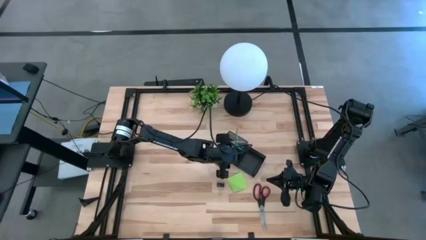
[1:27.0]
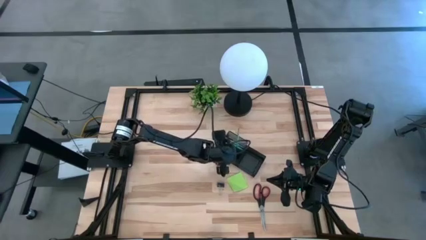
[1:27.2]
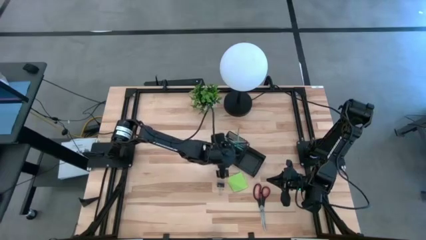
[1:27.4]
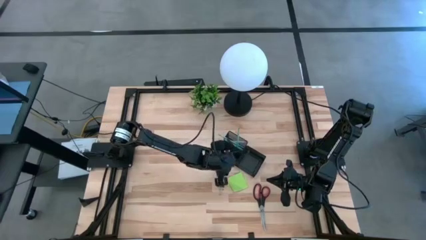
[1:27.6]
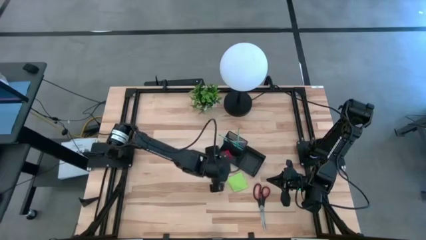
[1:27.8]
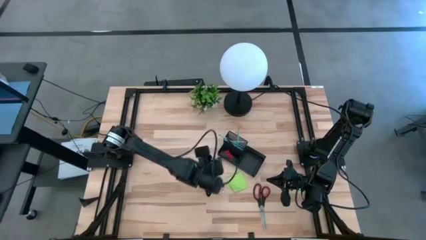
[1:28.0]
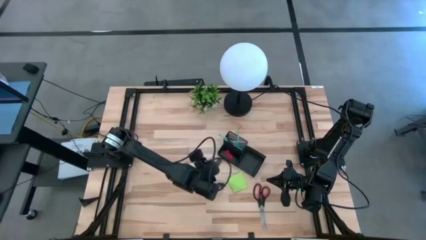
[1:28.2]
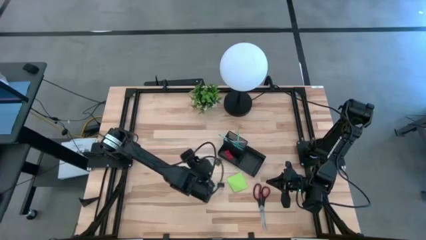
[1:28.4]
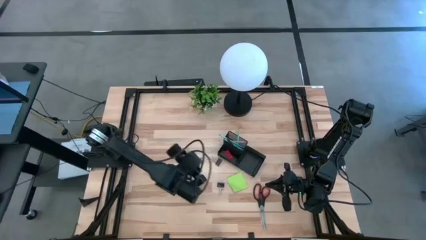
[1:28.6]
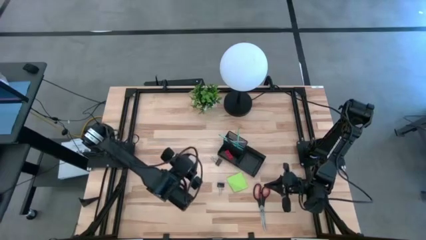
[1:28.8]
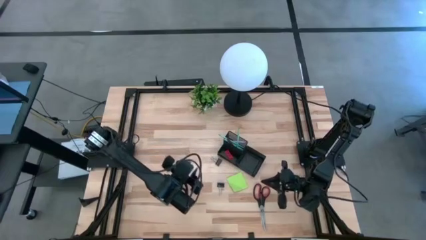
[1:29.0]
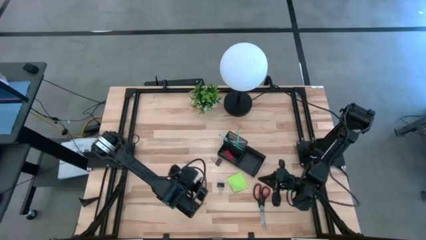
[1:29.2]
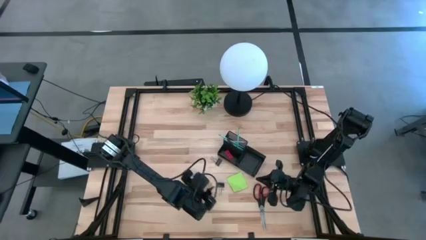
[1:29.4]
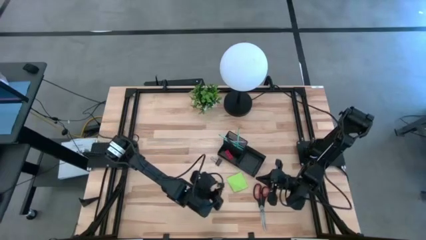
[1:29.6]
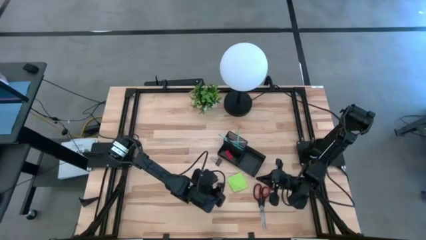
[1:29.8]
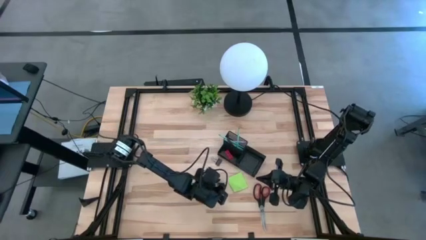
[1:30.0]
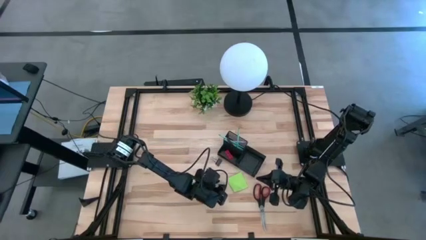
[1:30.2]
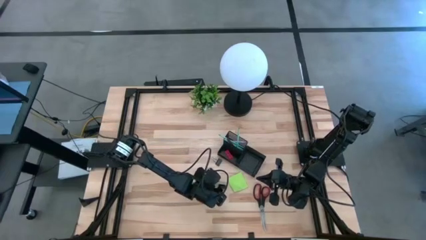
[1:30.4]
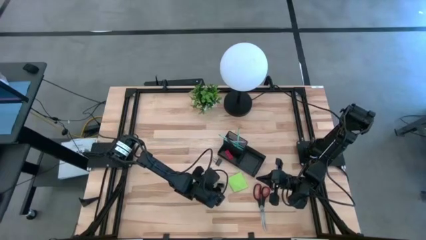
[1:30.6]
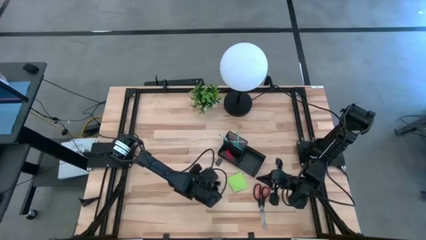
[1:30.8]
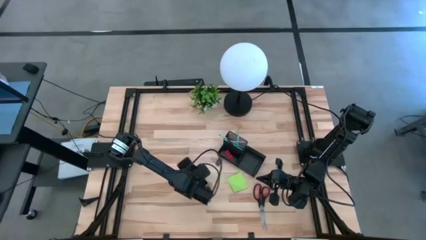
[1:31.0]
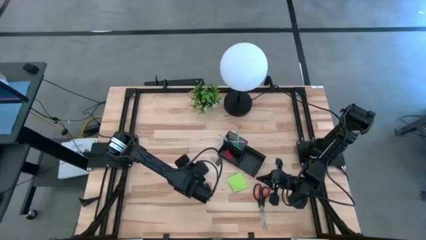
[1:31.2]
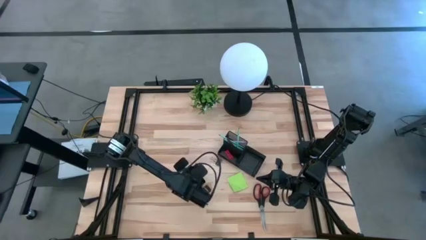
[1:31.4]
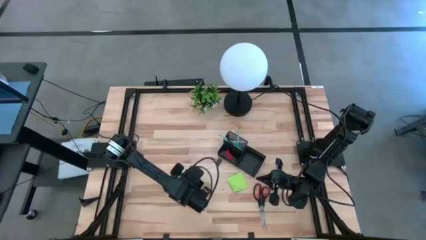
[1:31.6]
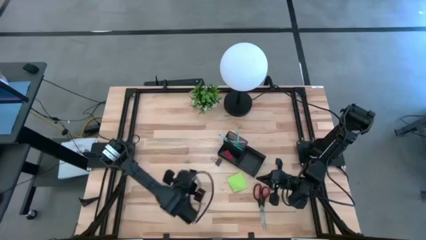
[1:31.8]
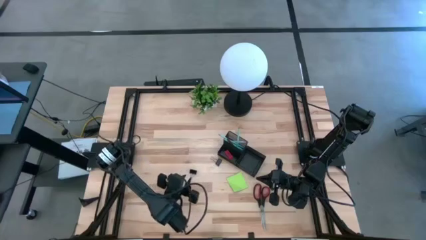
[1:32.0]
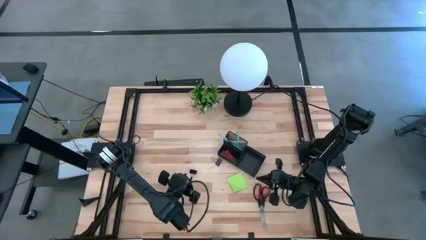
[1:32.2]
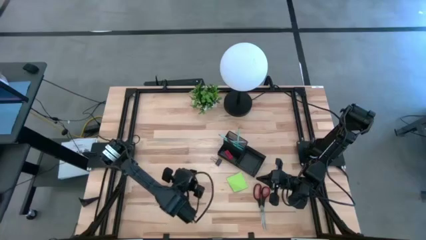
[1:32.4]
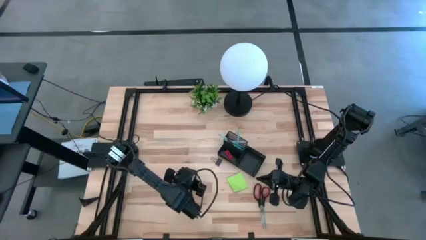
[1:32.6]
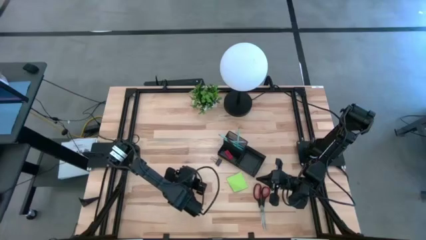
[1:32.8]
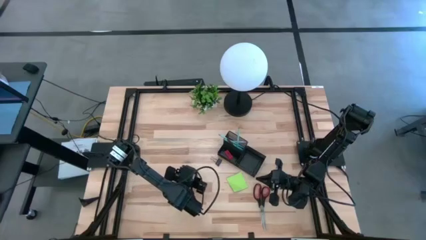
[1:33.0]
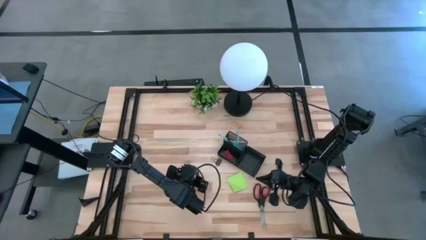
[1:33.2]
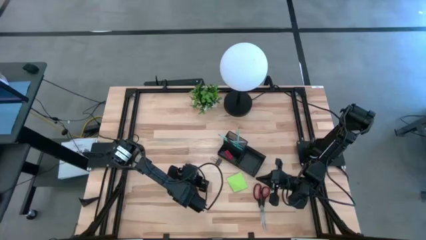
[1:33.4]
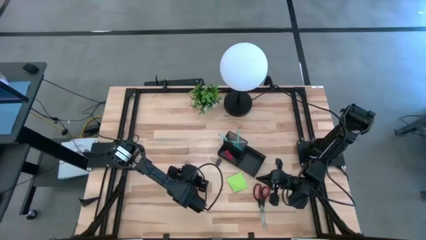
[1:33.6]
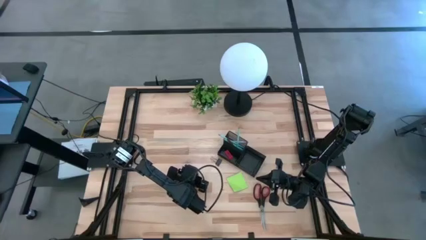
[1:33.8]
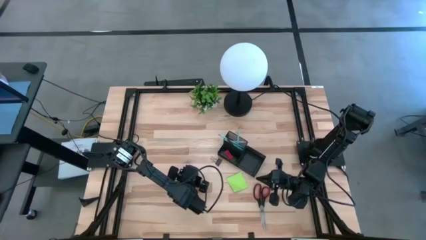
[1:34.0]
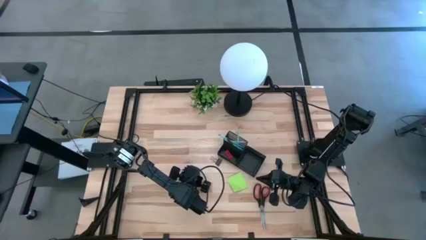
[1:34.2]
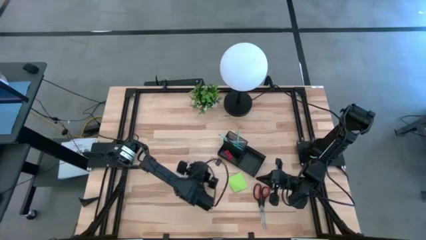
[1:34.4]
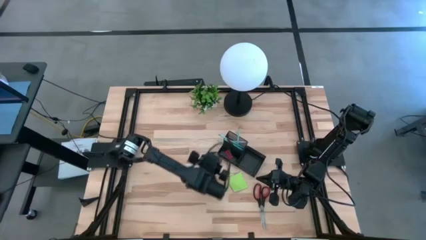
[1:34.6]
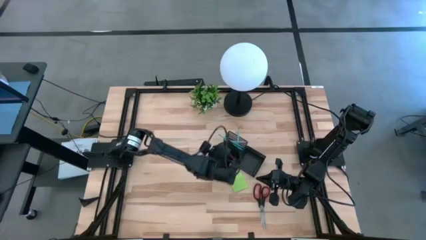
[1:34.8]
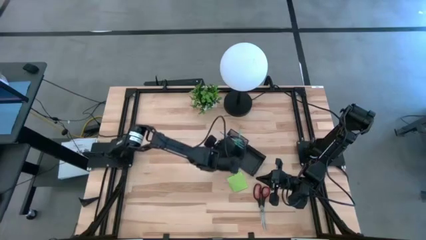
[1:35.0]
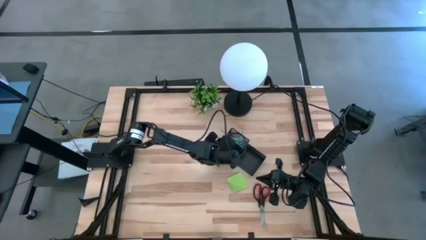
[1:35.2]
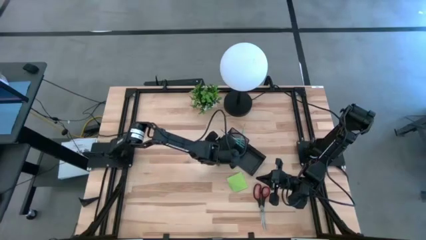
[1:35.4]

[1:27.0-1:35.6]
Task: Pick and place office supplies into organizer
Put the black binder clip into the desk organizer

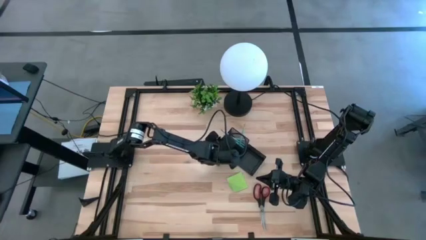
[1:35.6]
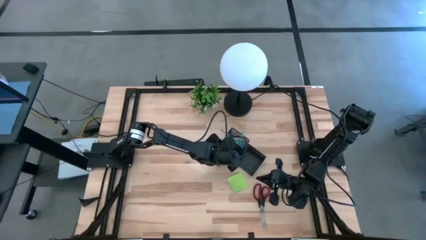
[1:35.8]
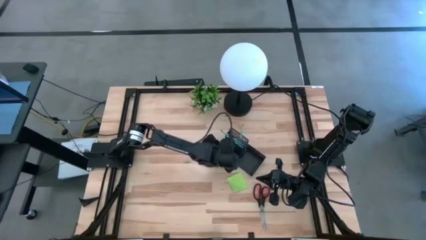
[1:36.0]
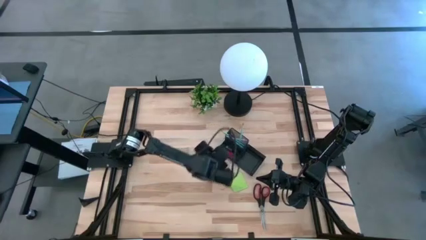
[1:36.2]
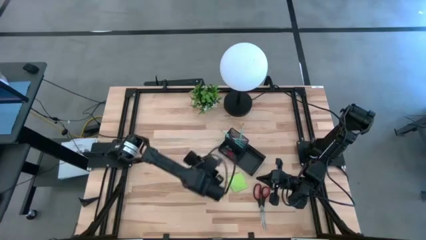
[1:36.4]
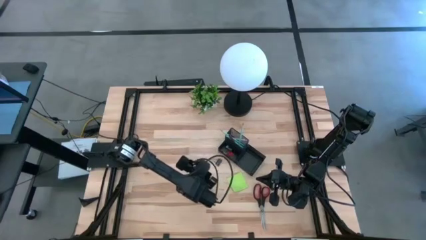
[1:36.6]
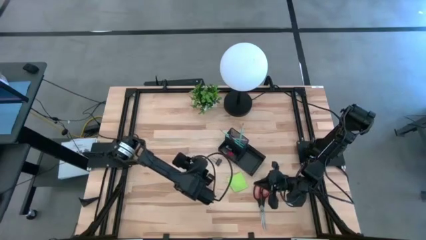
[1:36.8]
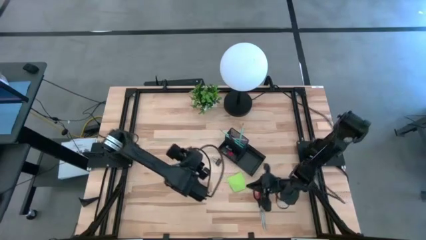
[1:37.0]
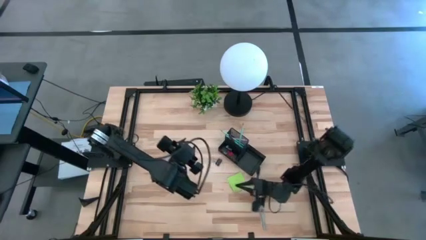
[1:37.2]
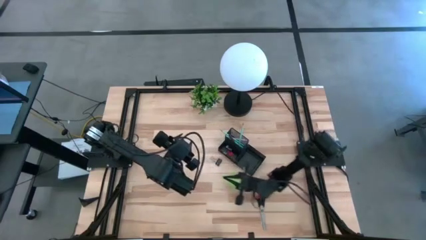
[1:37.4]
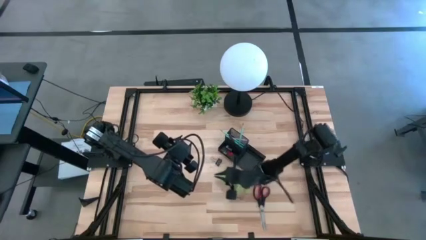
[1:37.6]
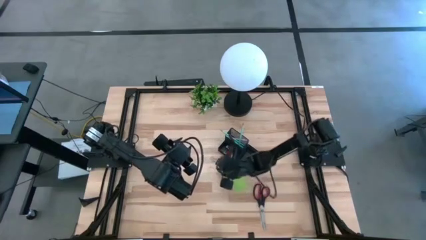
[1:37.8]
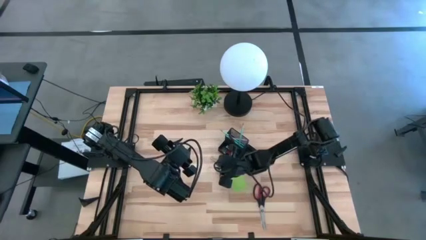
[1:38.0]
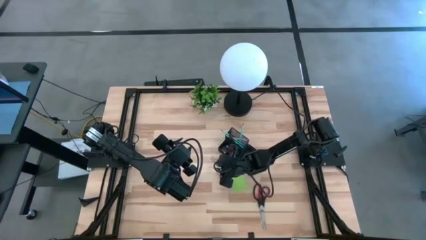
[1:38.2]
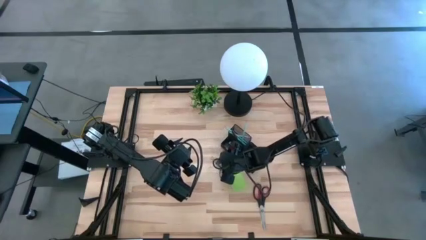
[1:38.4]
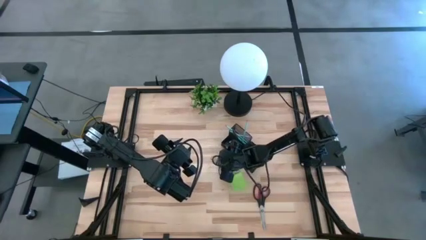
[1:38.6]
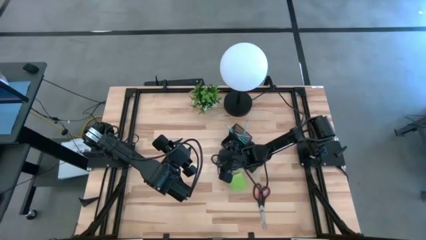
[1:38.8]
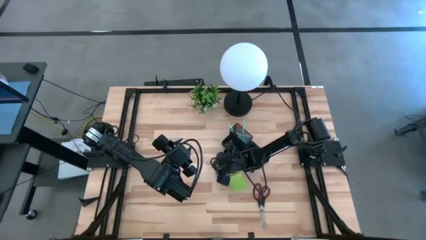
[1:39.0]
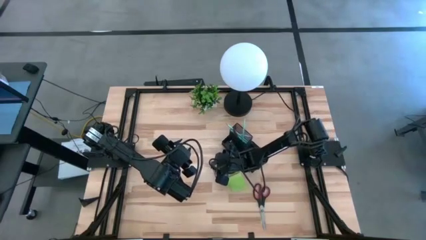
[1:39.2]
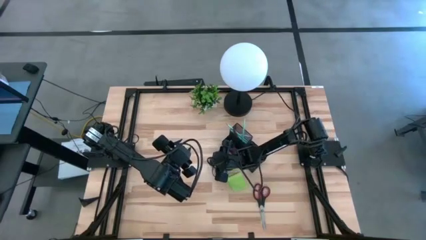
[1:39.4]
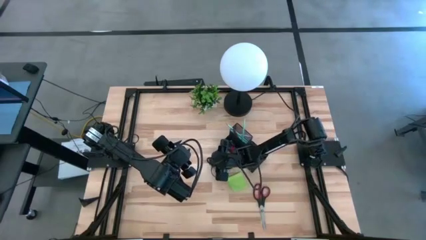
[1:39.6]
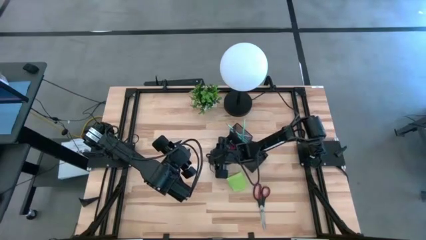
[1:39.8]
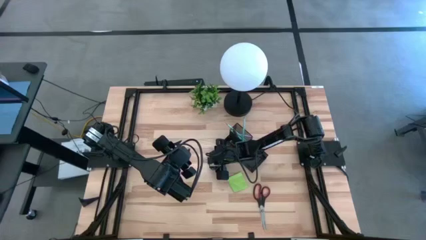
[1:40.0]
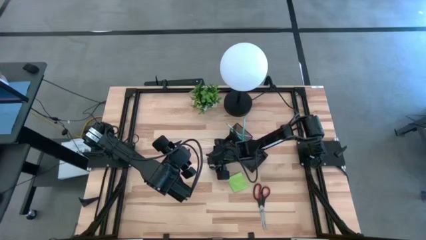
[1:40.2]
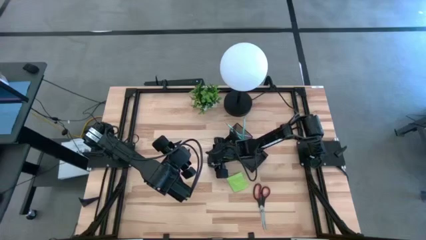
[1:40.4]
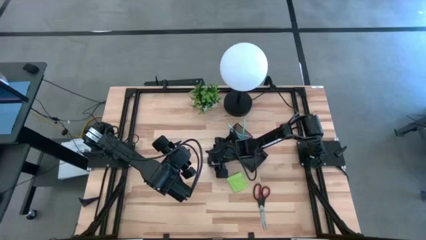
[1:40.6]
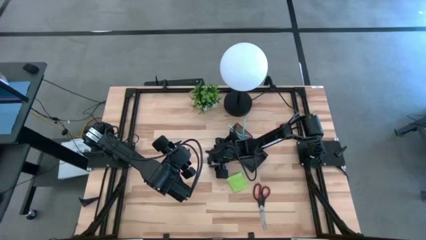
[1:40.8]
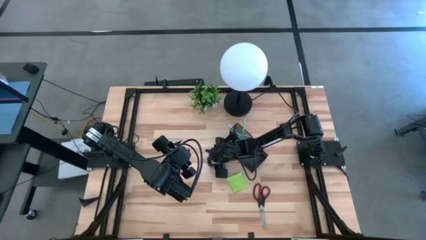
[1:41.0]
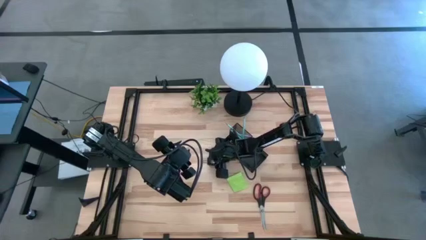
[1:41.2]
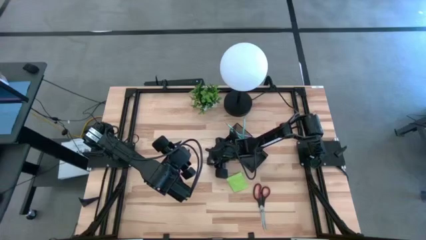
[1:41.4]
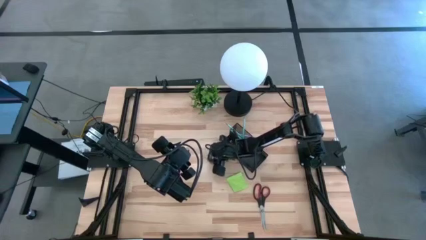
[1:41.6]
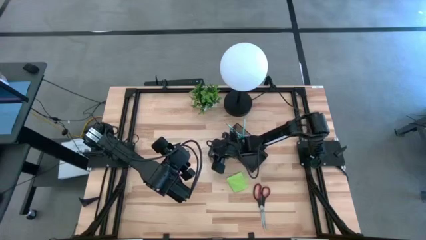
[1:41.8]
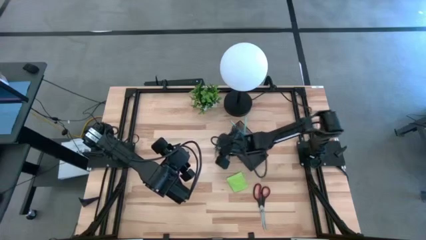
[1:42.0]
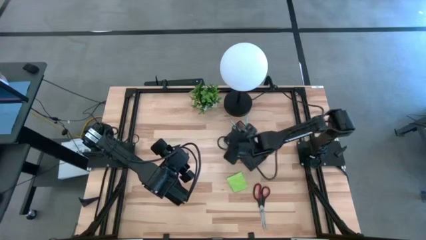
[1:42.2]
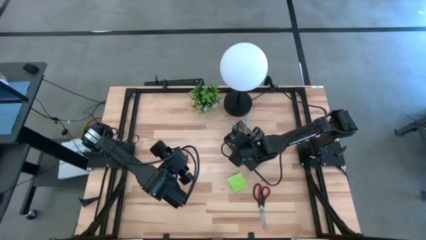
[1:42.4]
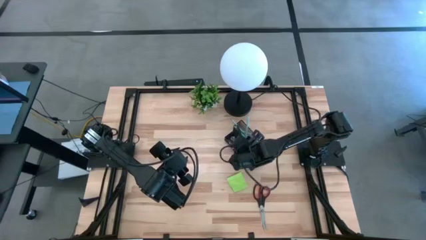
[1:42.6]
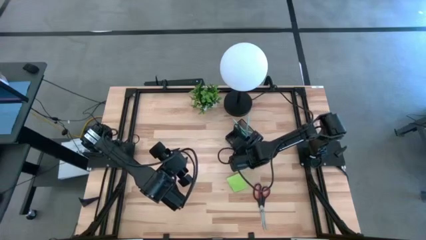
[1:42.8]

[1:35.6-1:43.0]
Put the black binder clip into the black supply organizer
